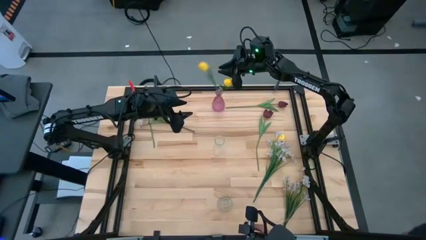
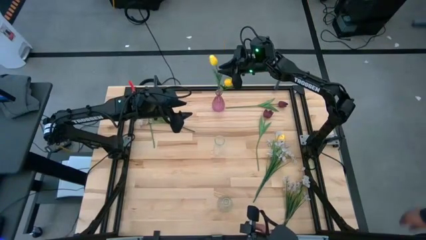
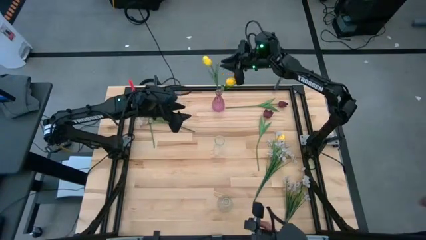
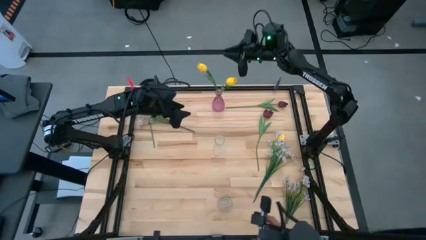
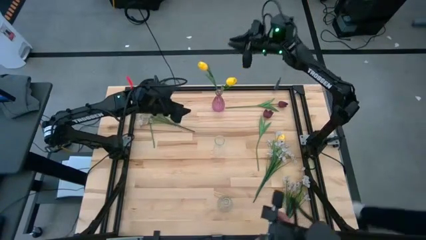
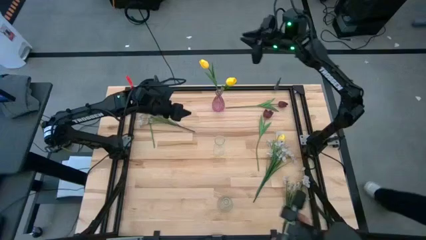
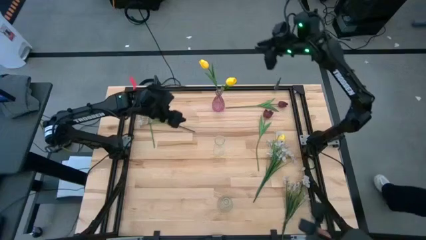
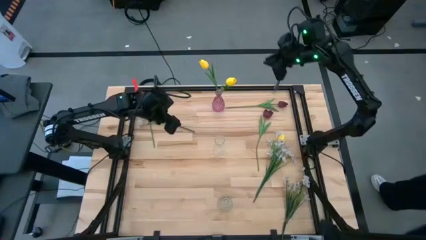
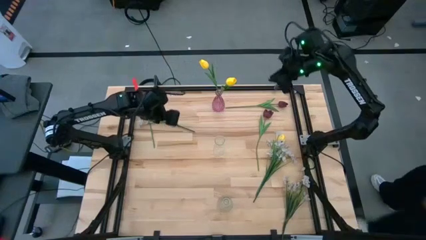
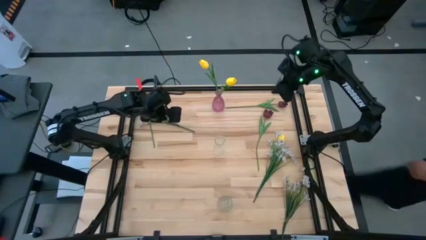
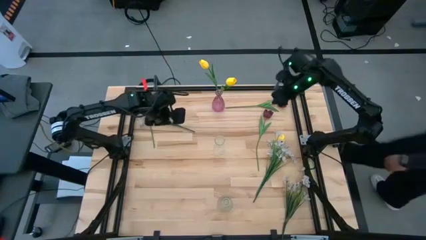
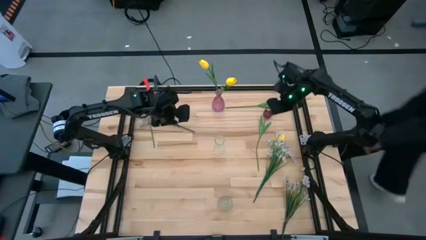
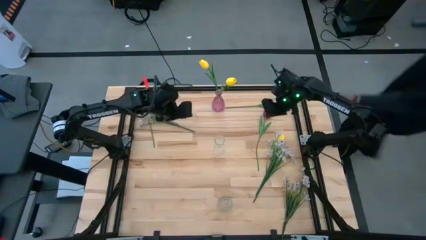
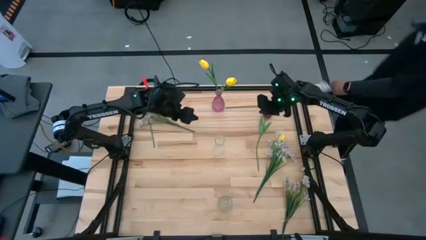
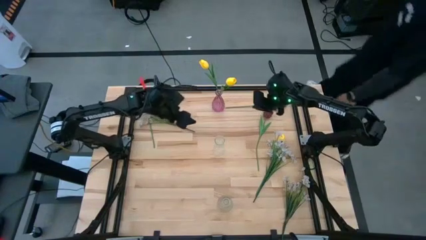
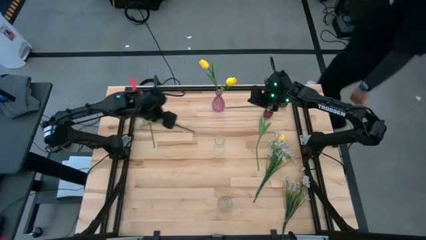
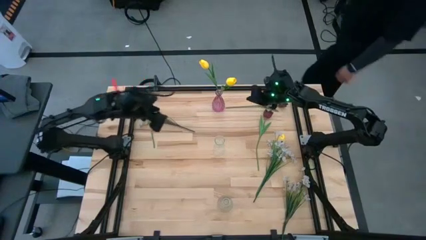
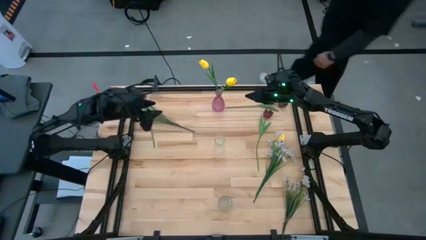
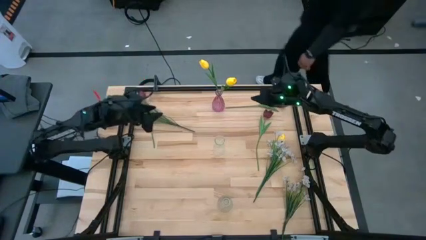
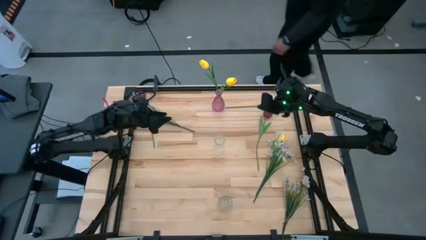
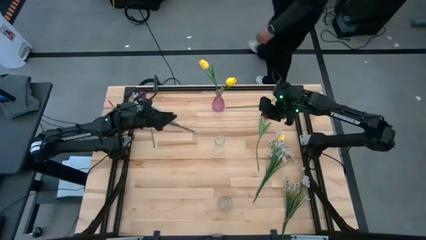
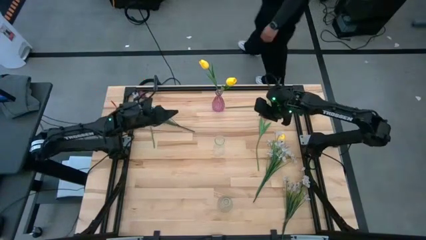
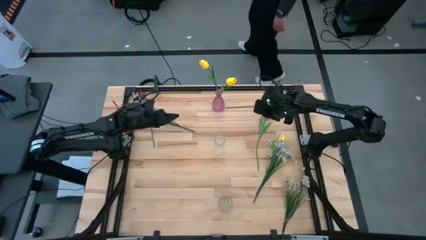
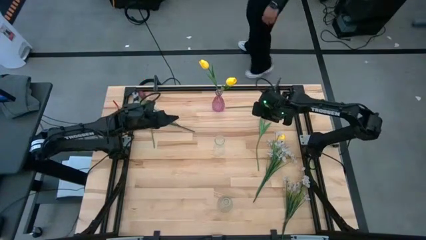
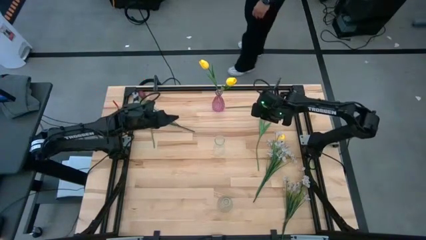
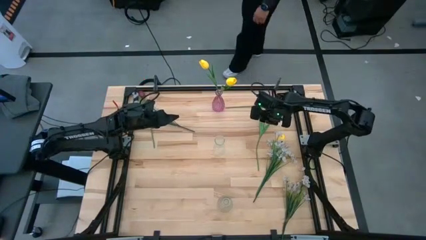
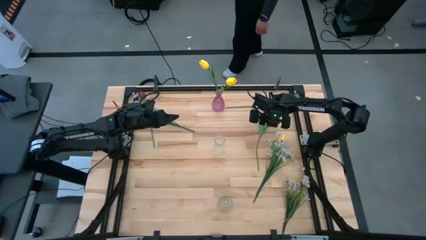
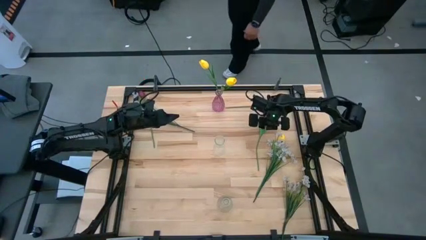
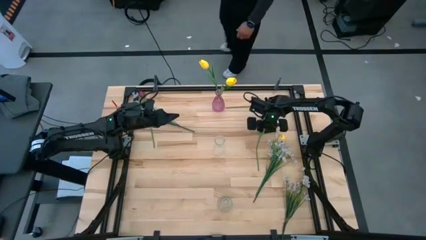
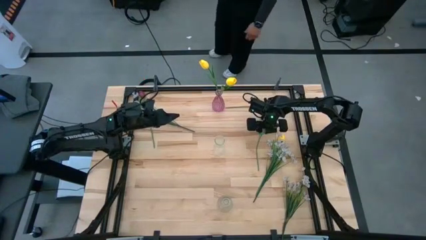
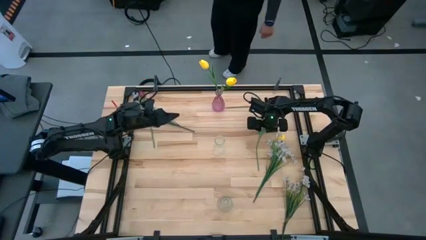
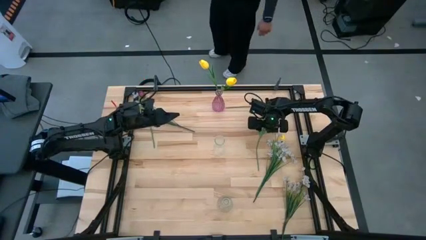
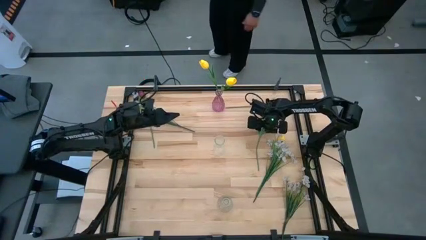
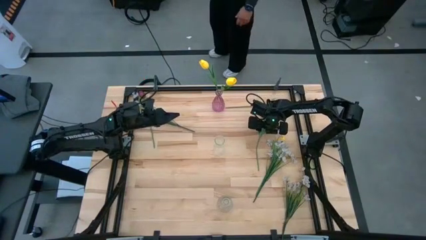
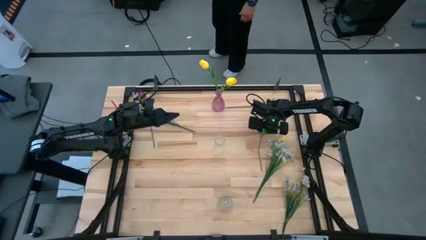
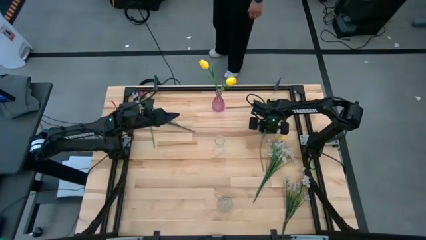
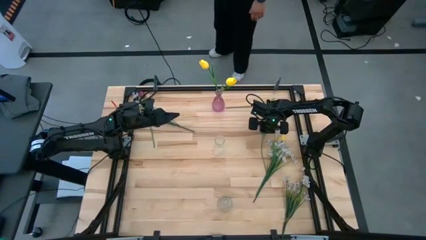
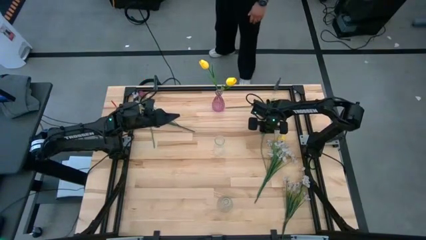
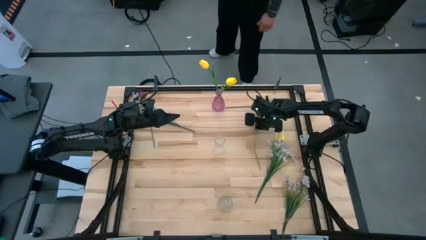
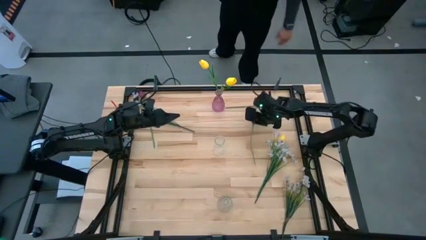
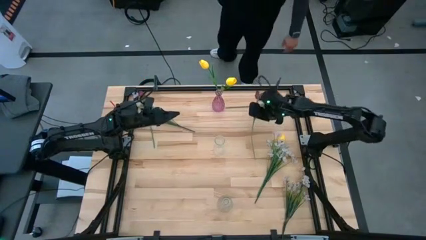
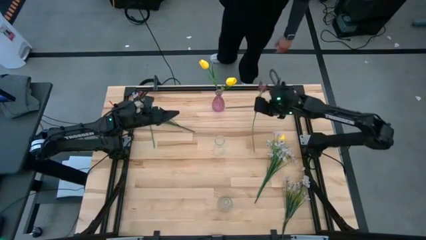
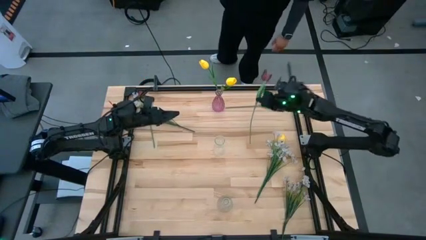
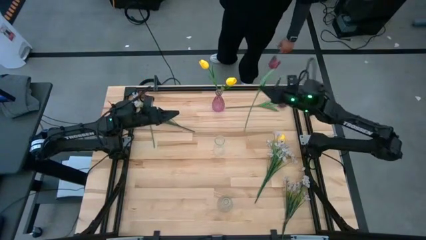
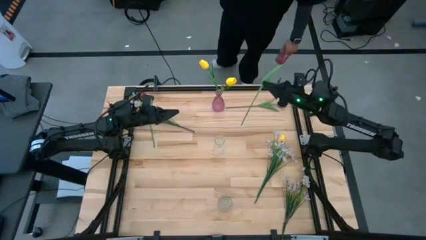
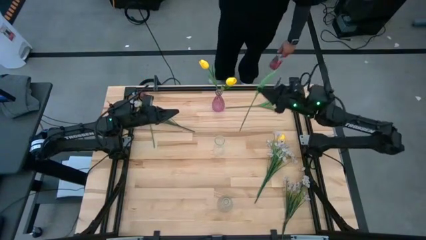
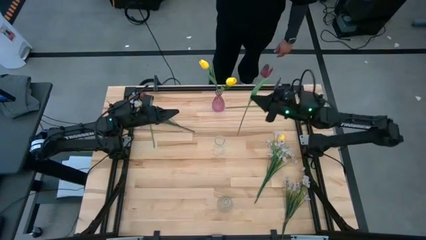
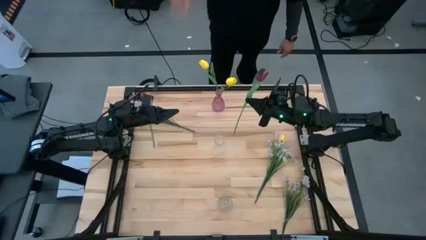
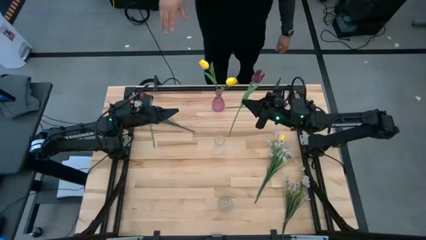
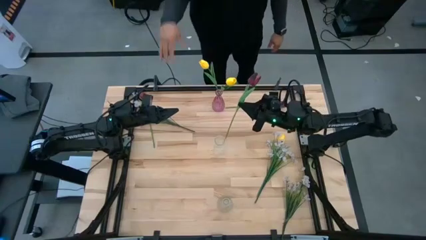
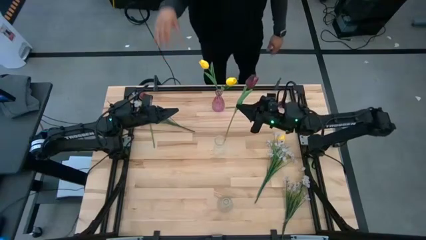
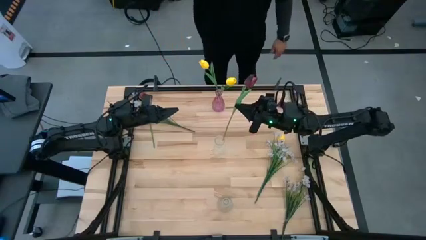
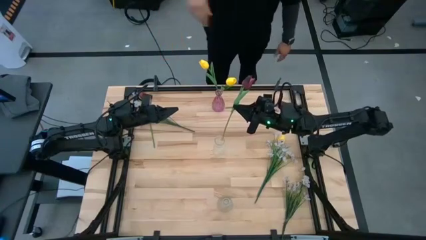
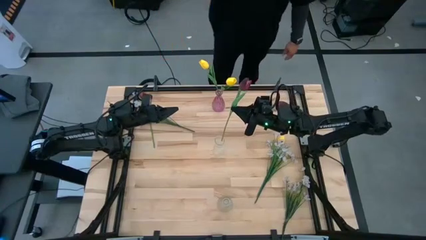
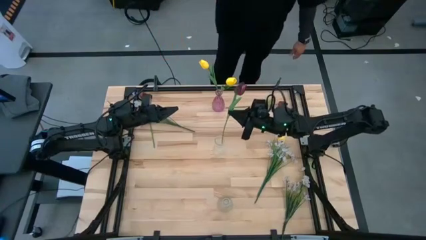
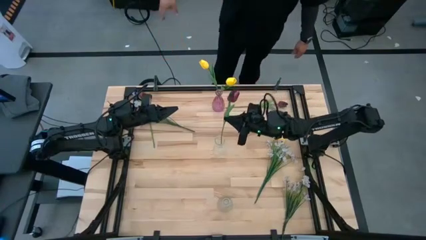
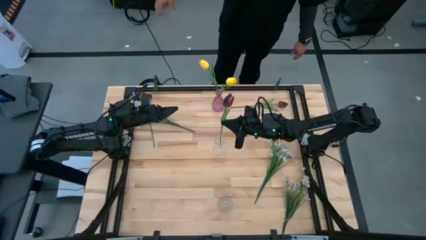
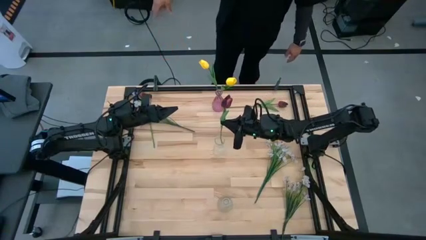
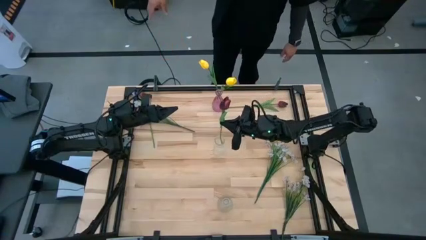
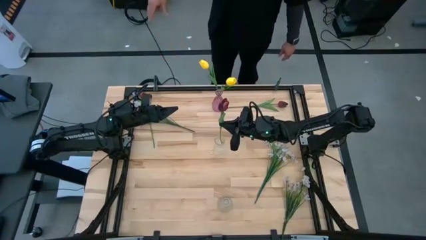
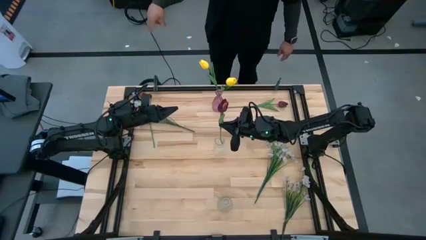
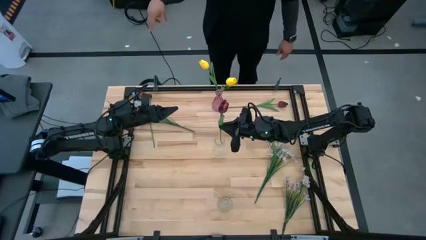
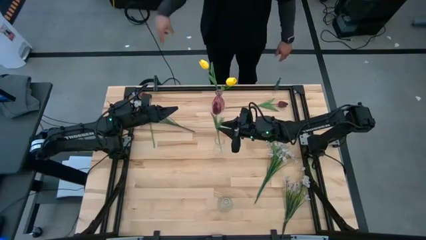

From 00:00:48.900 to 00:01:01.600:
Task: Sort flowers into vase by color
Put the bottom right red flower into the top transparent vase

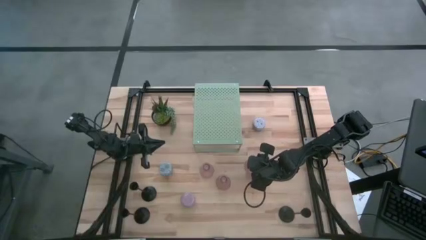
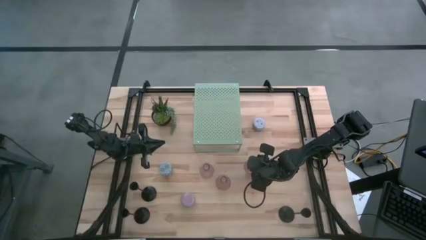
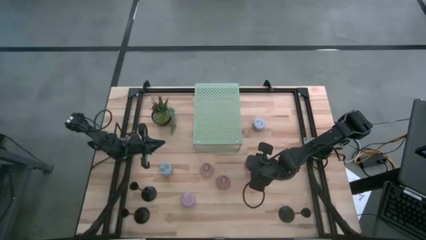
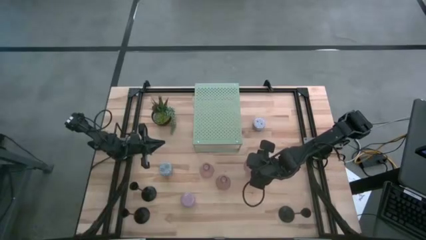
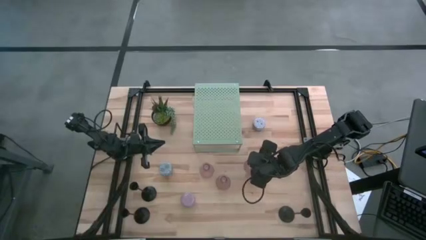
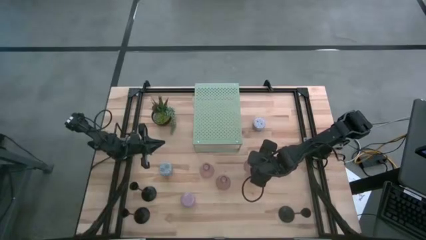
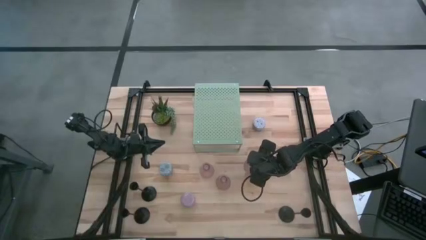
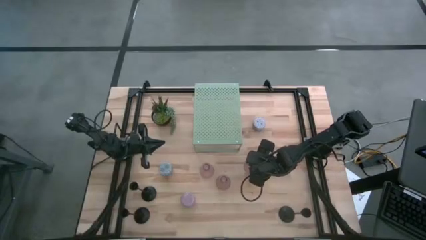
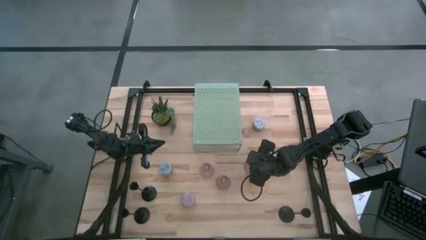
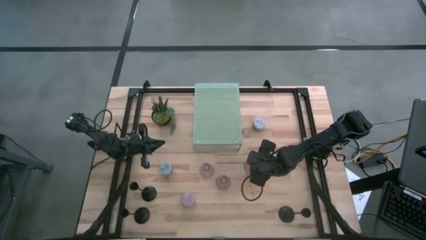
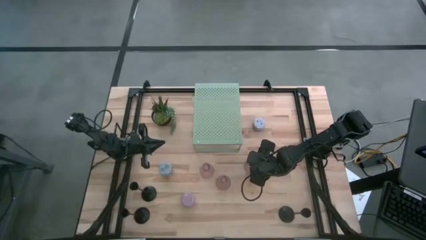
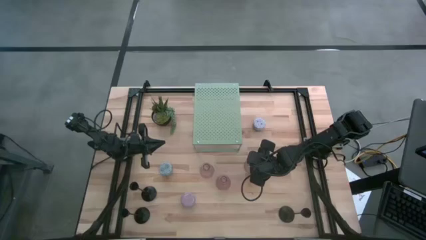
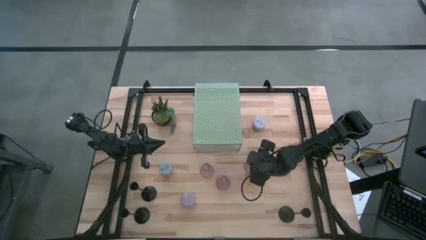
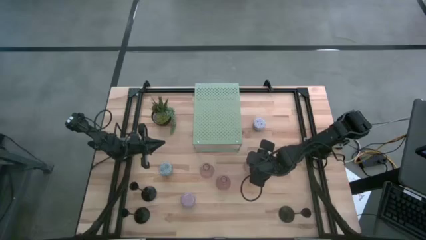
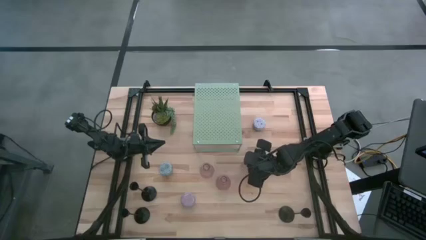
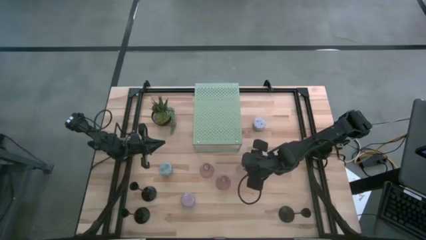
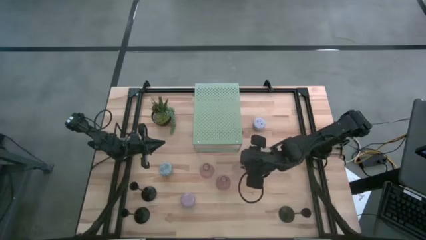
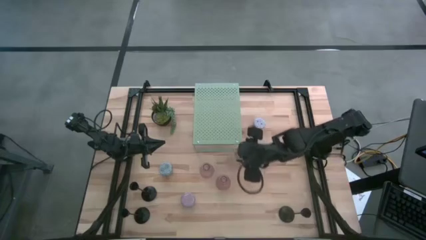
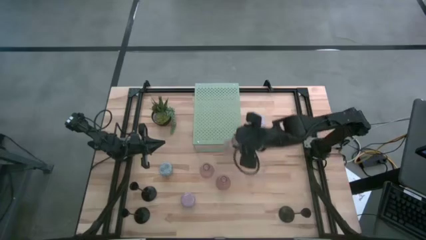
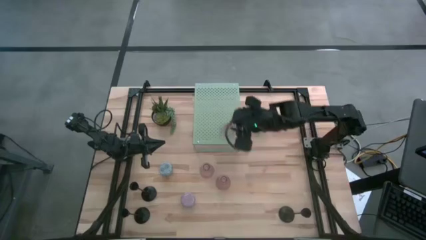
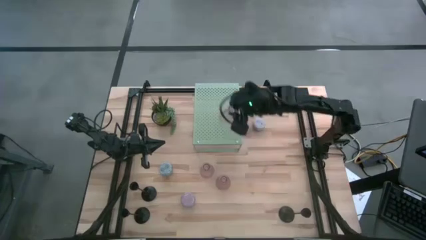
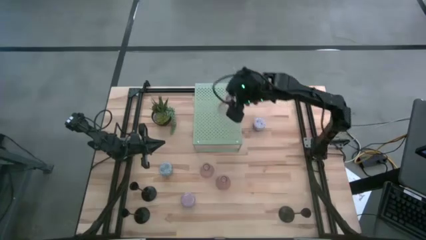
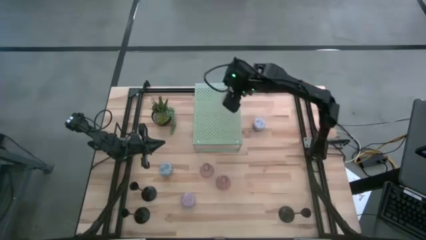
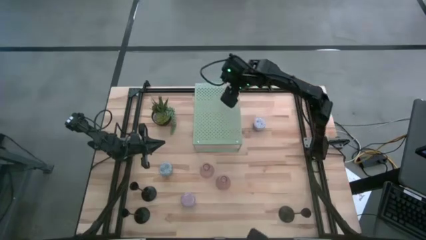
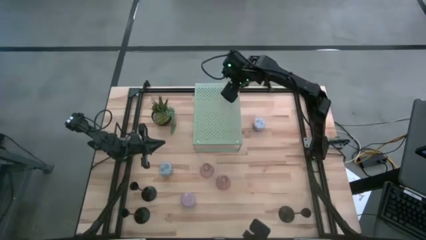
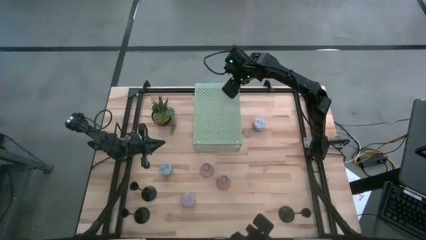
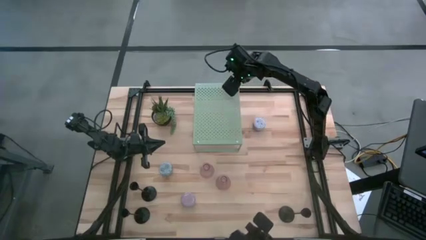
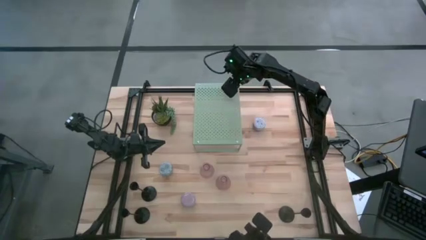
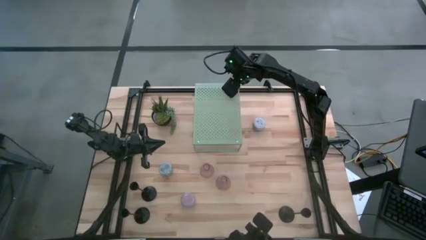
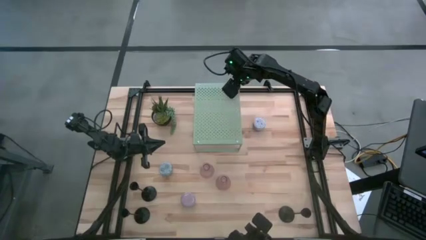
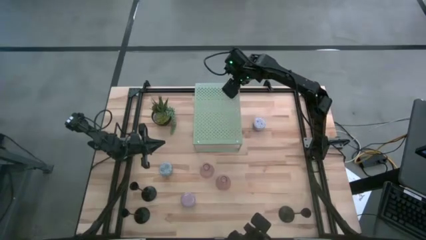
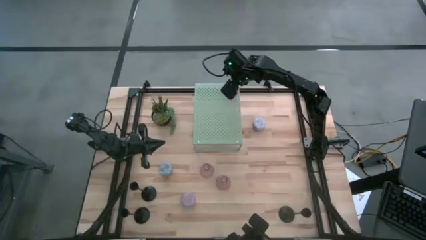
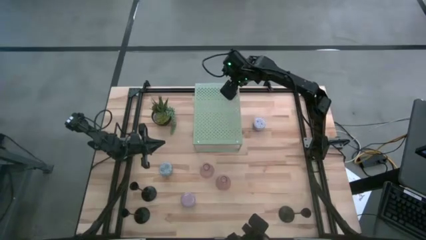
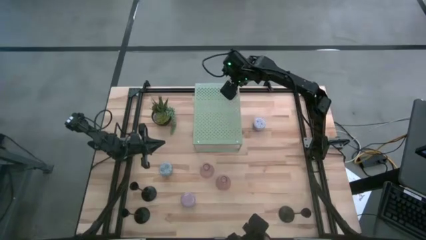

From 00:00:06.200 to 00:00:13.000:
Task: Pick & Place candle stick holders
Put the top right pink glass candle holder on the shelf
